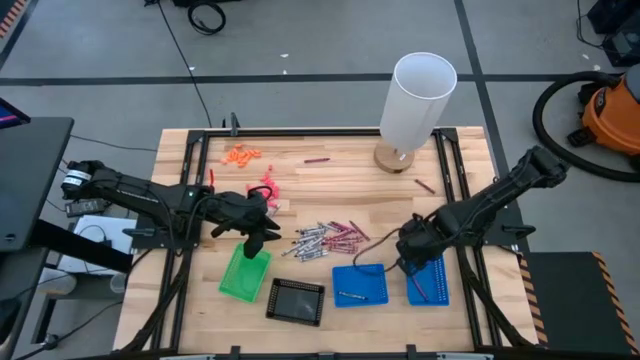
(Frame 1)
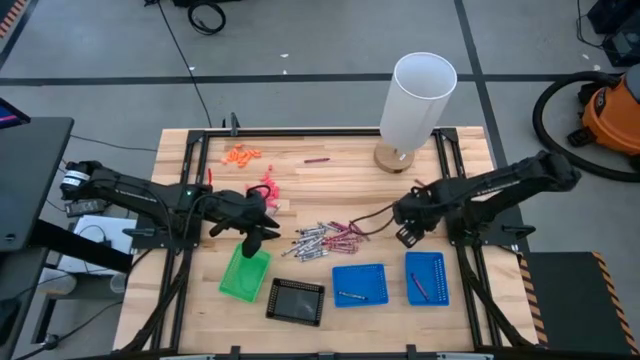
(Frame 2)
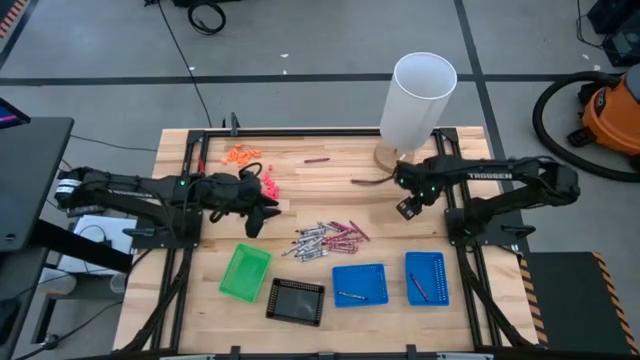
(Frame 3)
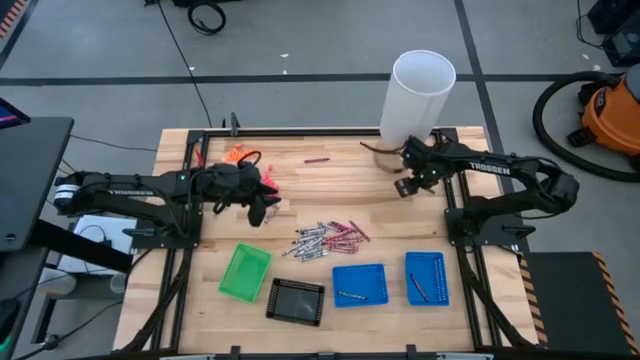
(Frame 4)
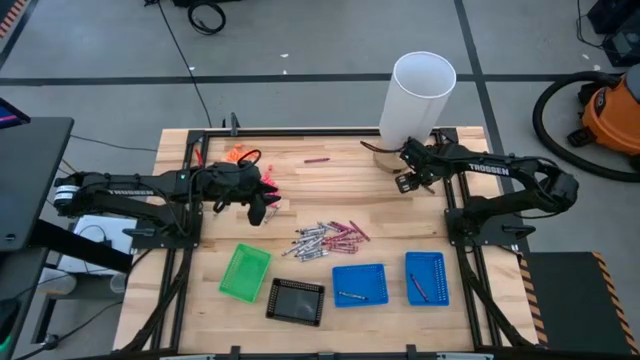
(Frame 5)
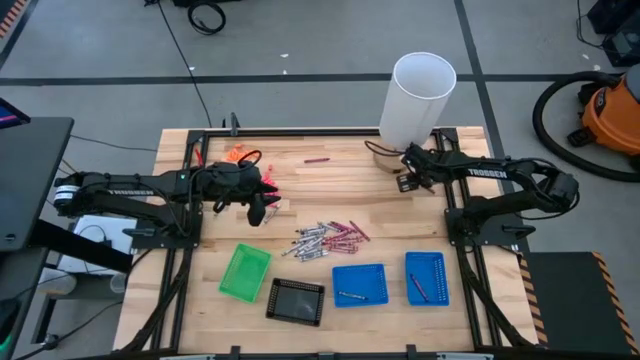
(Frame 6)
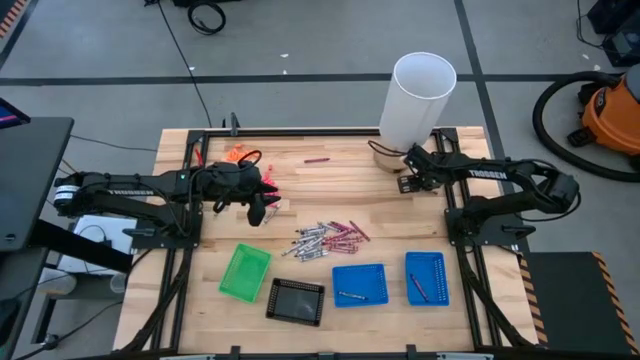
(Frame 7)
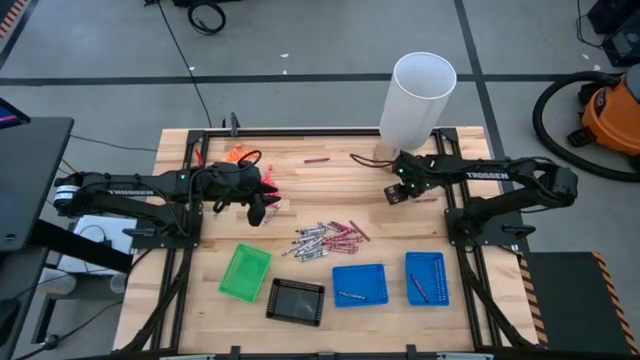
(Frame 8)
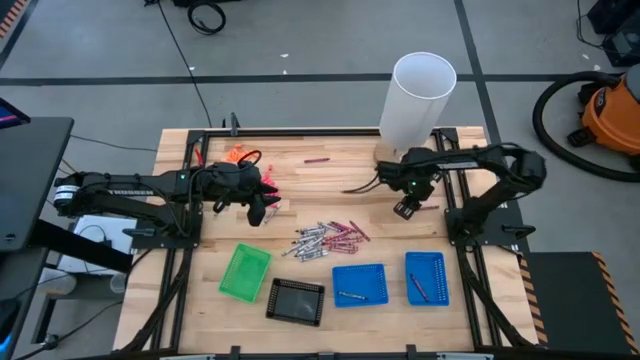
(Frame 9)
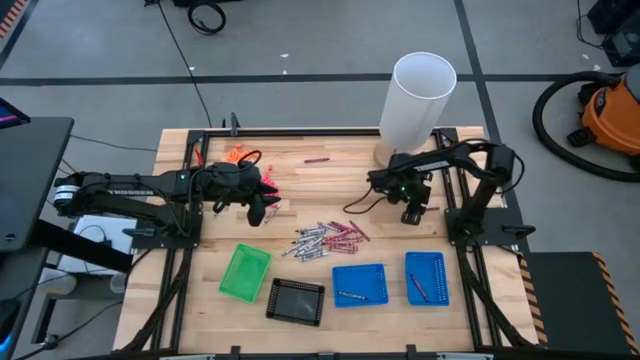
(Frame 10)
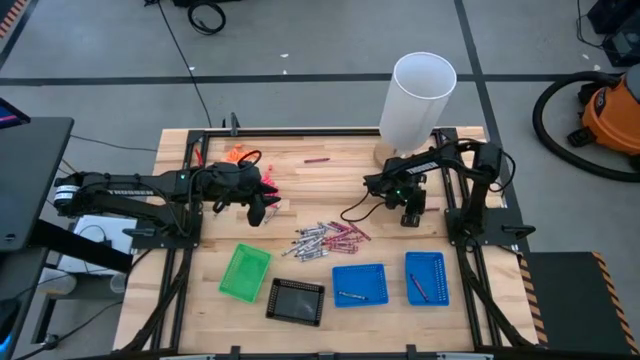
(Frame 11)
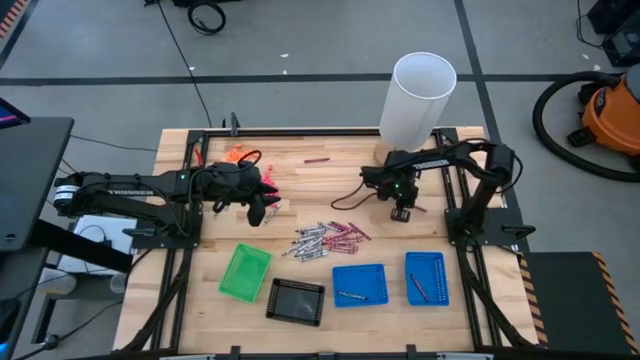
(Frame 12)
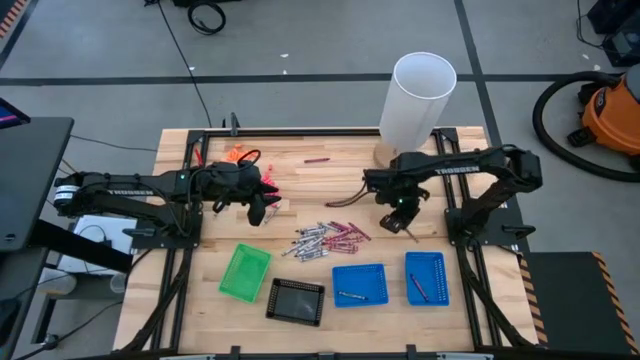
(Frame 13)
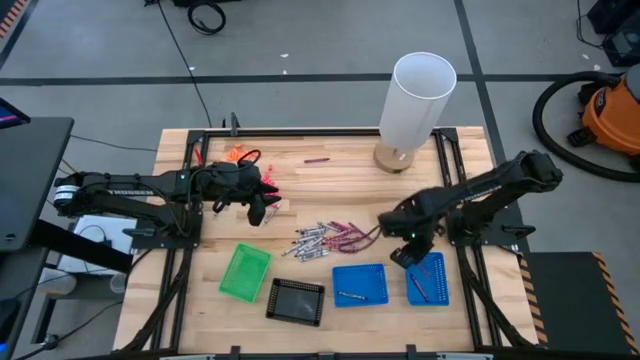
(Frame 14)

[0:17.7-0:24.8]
Task: Sort crayons
Put the red crayon into the right blue basket

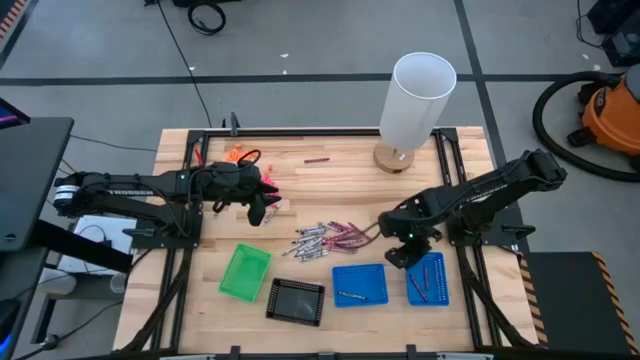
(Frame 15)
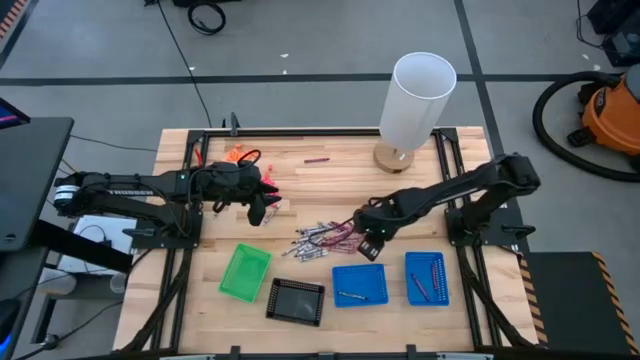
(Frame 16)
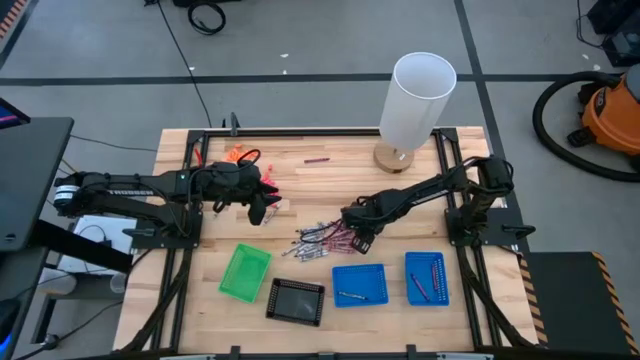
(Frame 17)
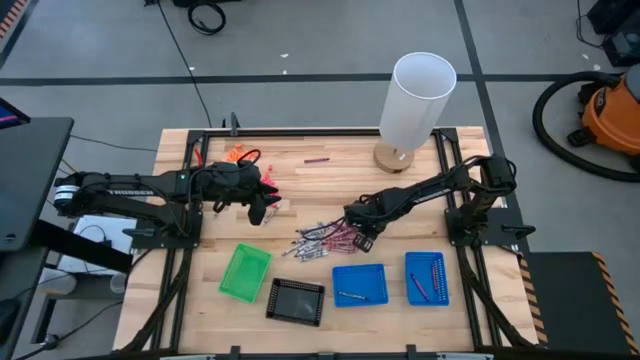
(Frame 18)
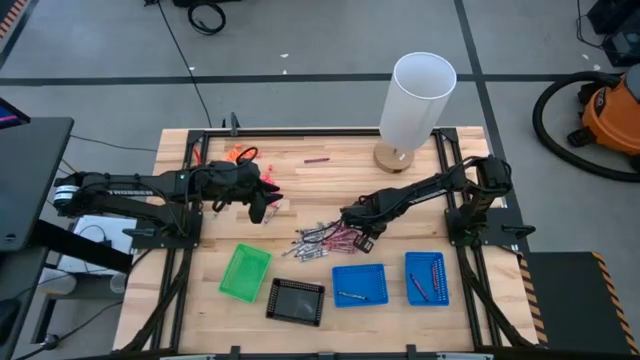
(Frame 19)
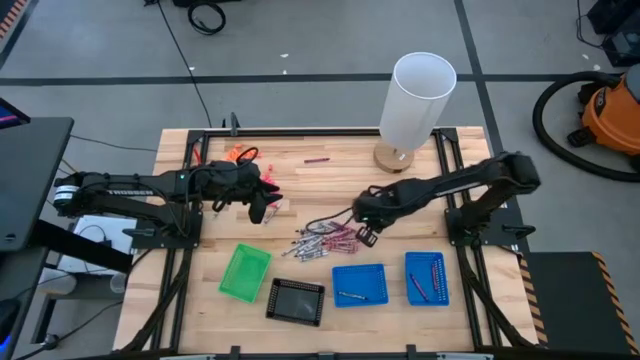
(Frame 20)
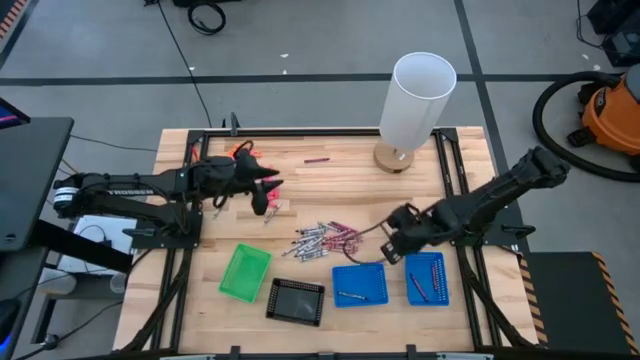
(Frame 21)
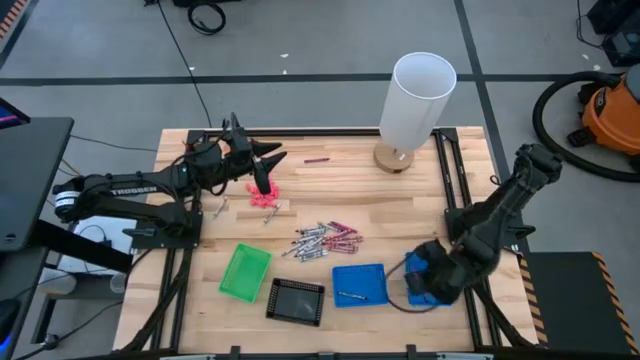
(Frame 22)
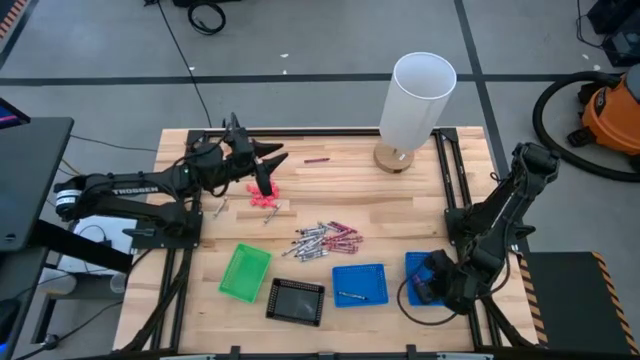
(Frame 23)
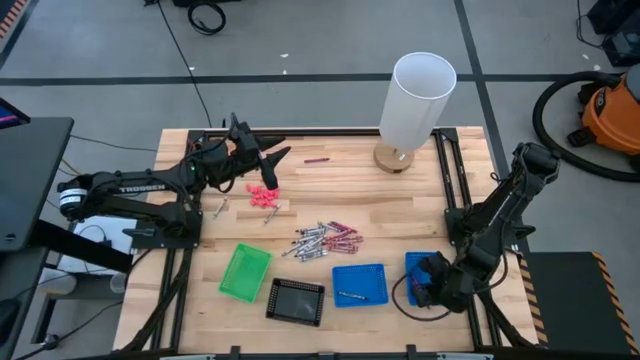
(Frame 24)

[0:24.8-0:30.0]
Put the red crayon into the right blue basket

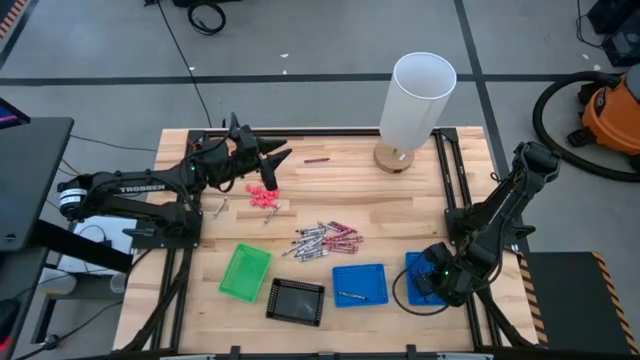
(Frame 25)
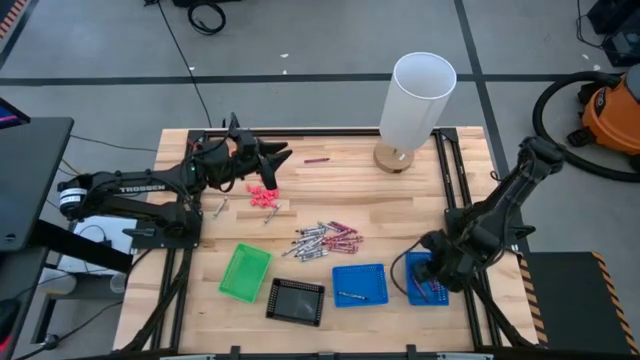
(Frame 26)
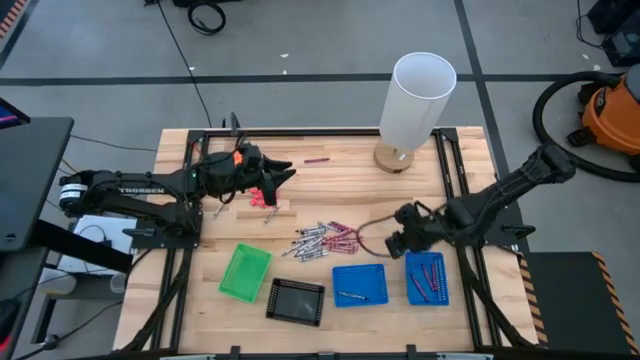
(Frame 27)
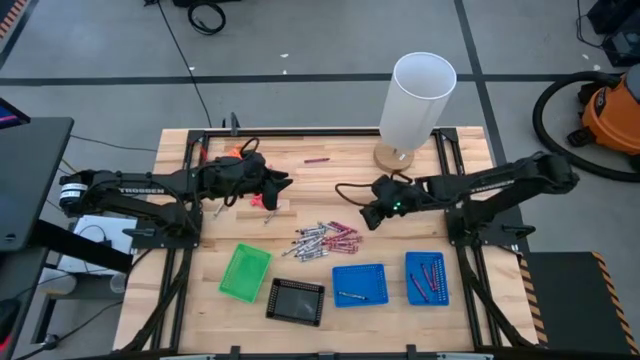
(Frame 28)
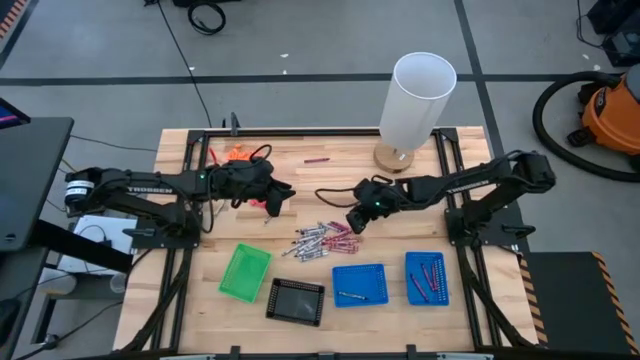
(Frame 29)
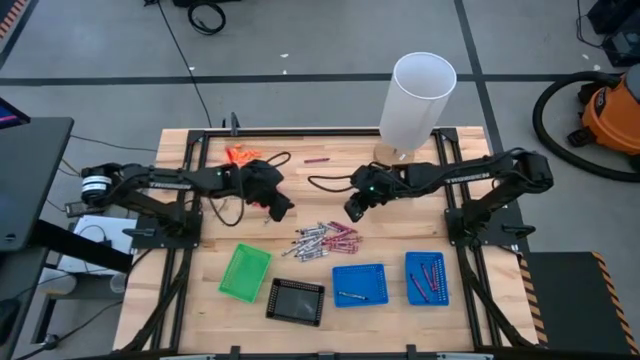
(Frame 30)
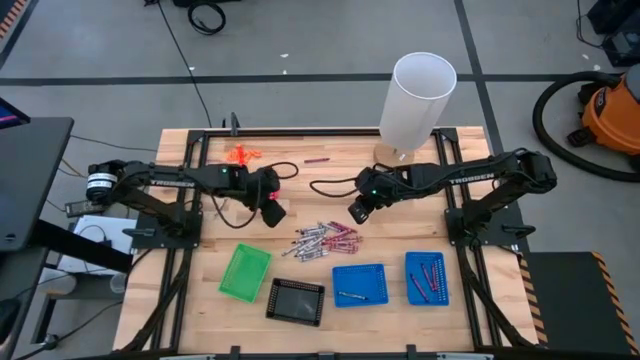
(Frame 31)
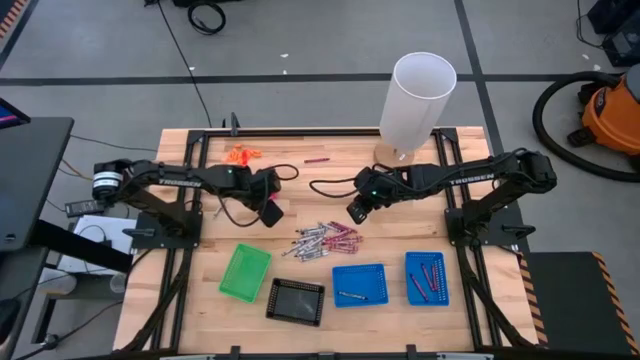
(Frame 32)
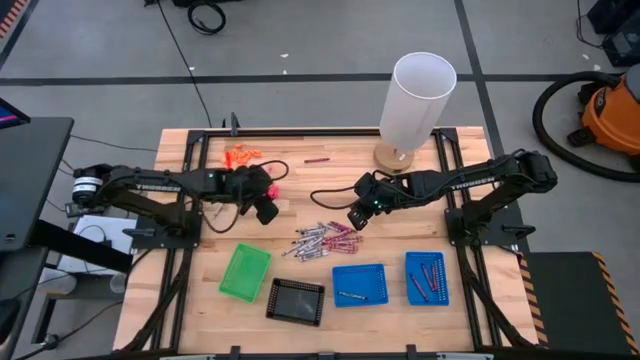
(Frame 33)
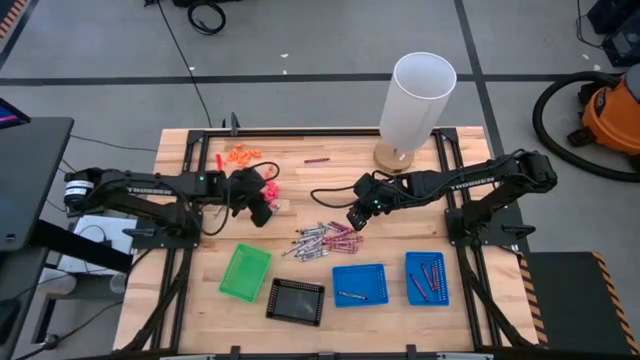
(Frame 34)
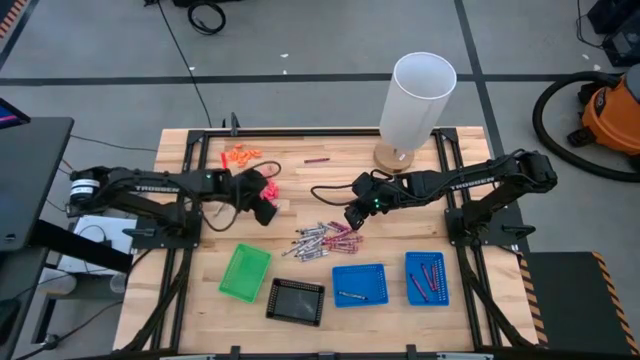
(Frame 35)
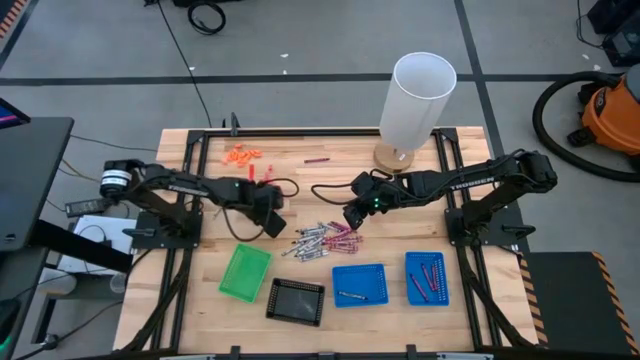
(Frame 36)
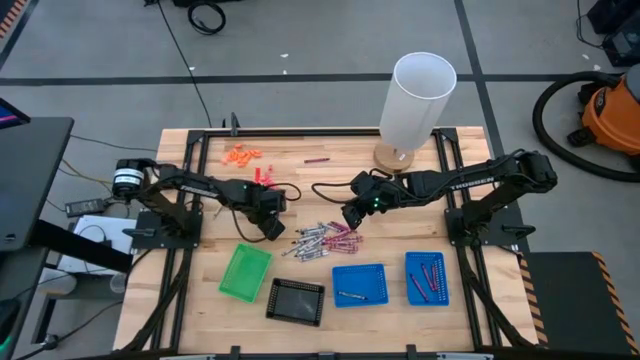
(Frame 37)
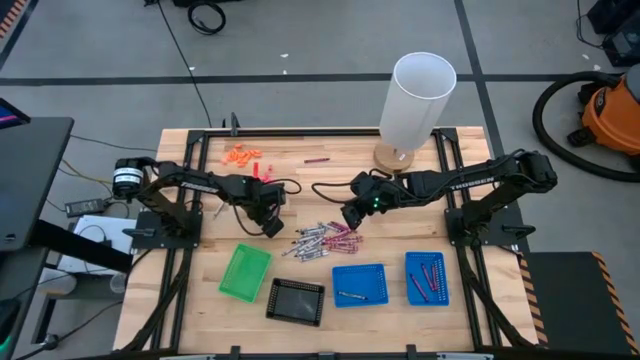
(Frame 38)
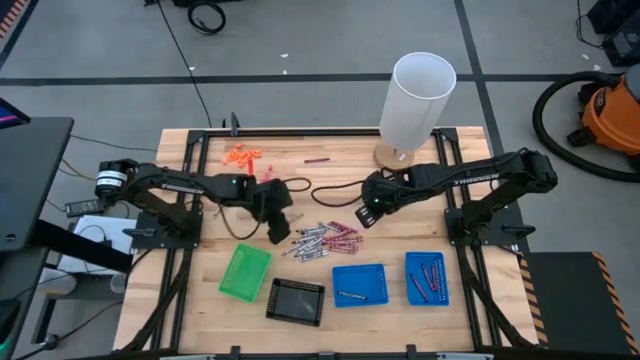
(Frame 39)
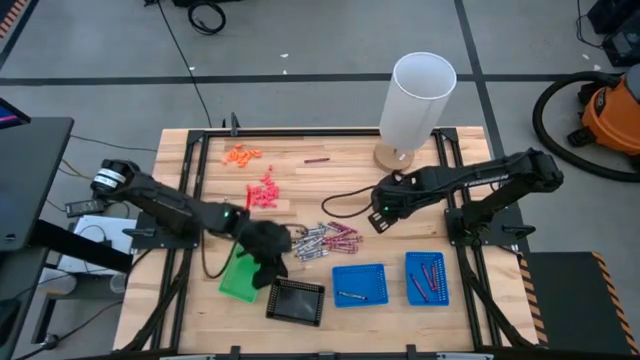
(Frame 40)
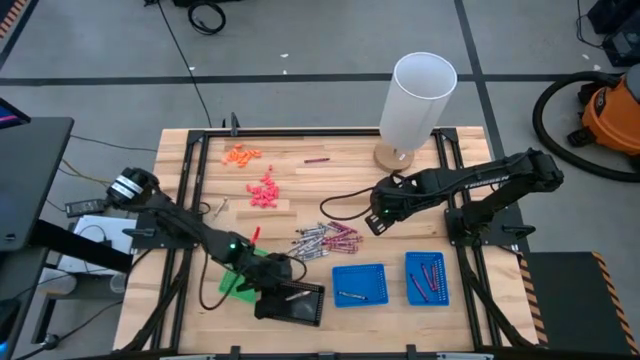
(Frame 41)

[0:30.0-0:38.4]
Put the white crayon into the black basket
